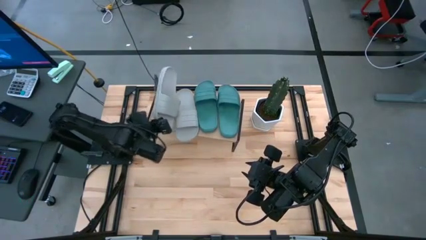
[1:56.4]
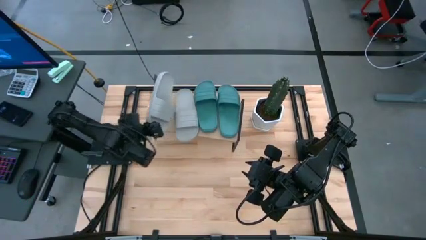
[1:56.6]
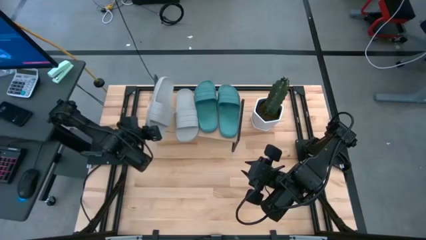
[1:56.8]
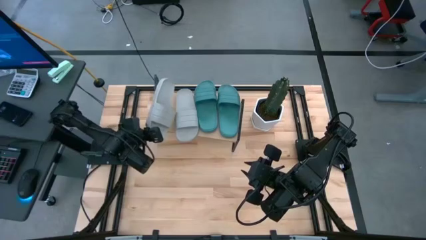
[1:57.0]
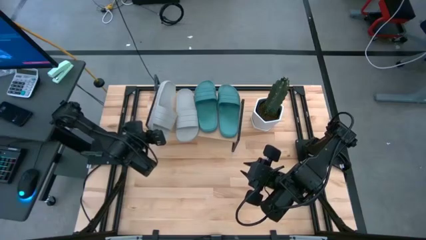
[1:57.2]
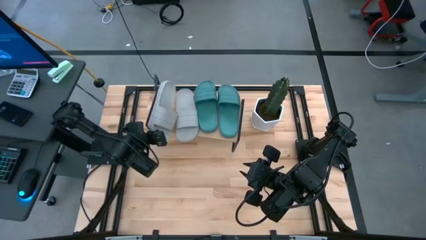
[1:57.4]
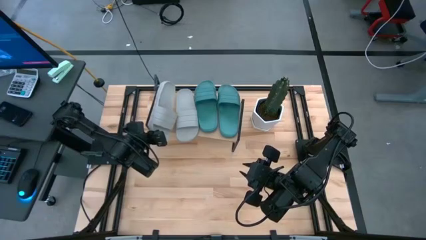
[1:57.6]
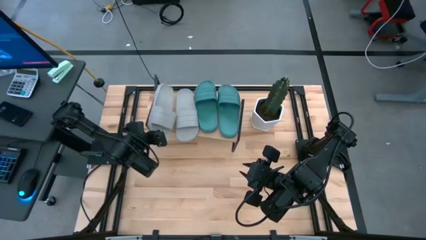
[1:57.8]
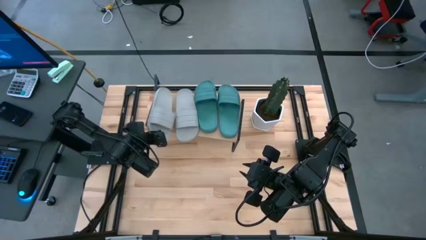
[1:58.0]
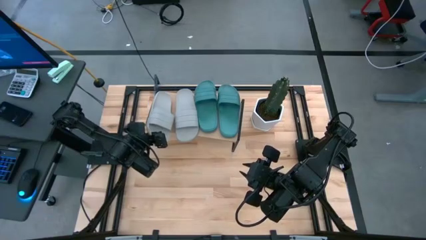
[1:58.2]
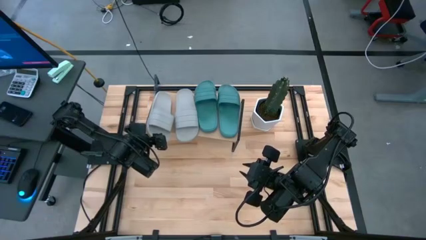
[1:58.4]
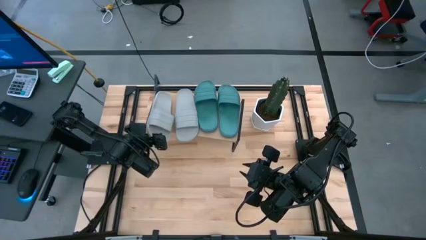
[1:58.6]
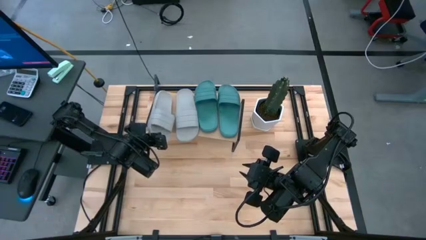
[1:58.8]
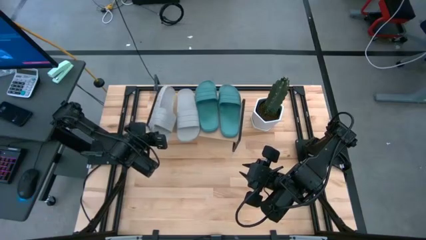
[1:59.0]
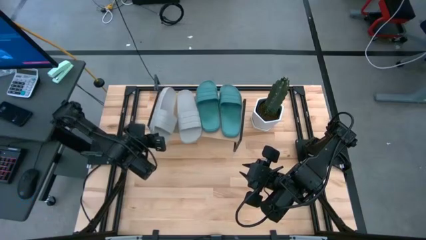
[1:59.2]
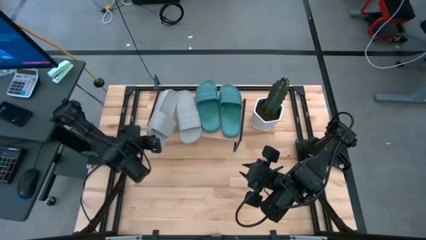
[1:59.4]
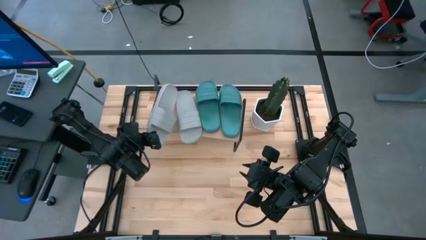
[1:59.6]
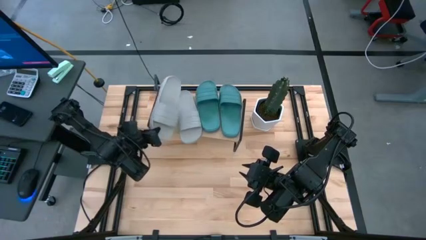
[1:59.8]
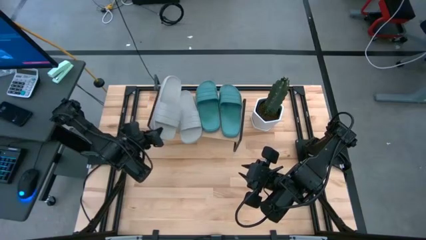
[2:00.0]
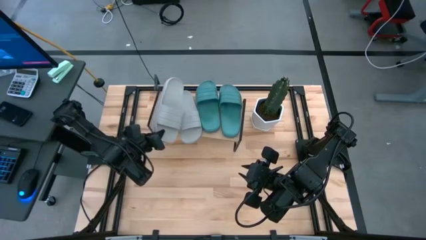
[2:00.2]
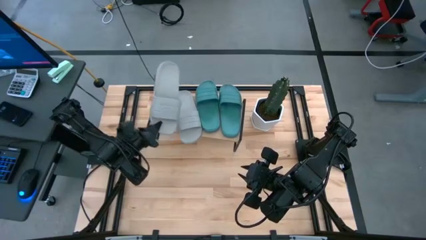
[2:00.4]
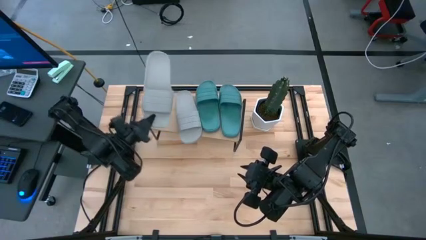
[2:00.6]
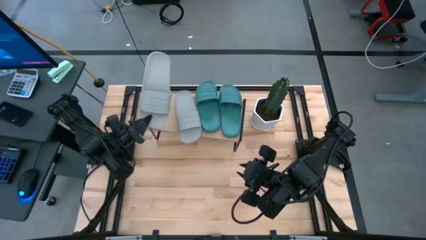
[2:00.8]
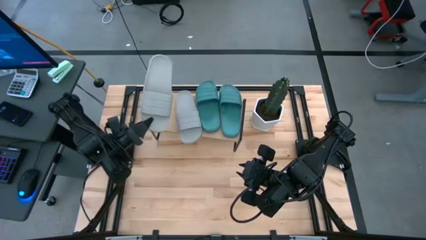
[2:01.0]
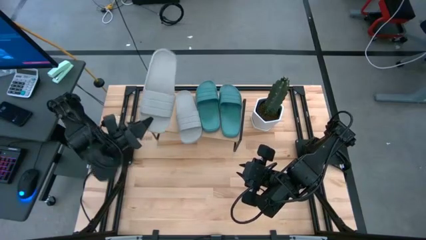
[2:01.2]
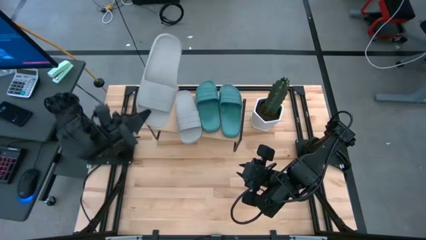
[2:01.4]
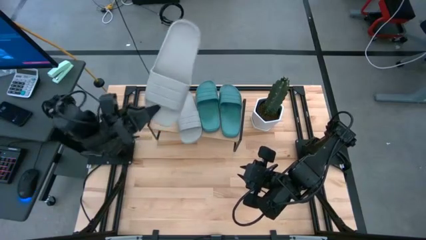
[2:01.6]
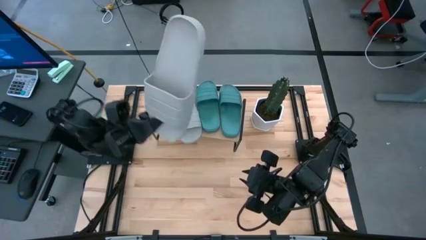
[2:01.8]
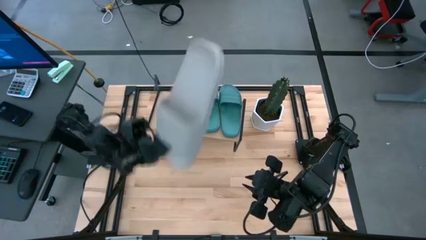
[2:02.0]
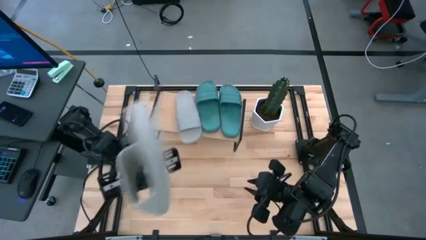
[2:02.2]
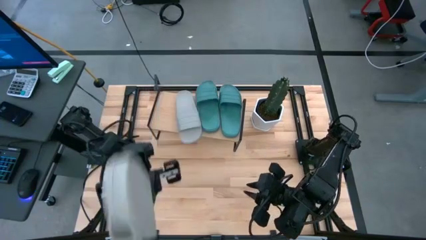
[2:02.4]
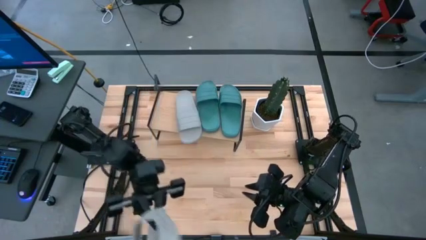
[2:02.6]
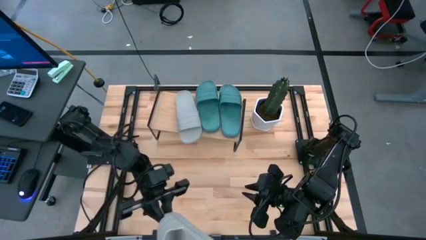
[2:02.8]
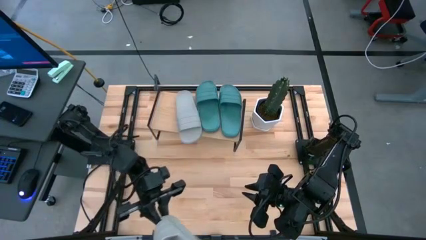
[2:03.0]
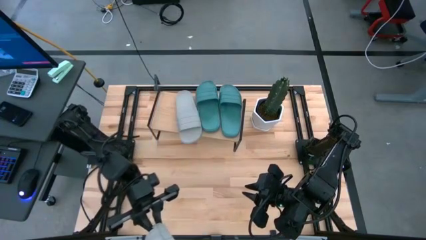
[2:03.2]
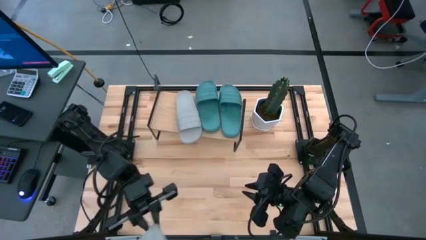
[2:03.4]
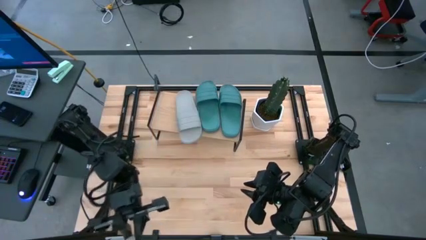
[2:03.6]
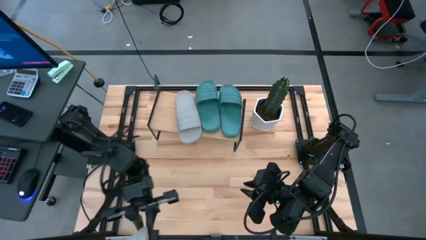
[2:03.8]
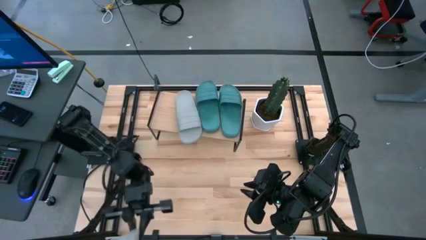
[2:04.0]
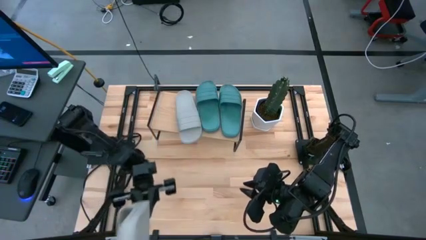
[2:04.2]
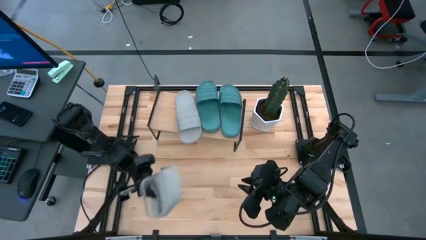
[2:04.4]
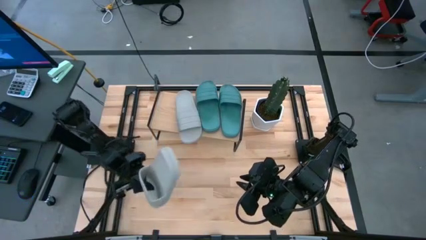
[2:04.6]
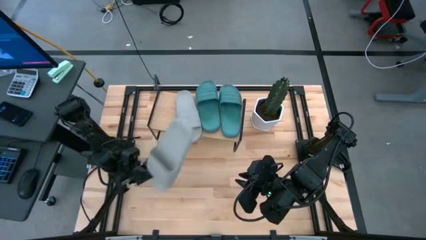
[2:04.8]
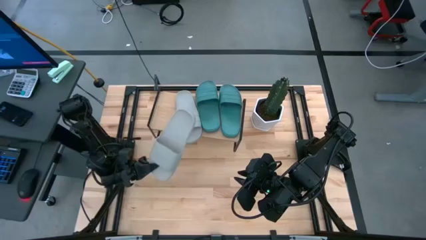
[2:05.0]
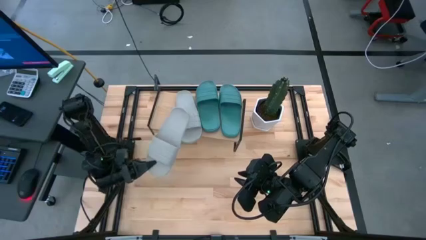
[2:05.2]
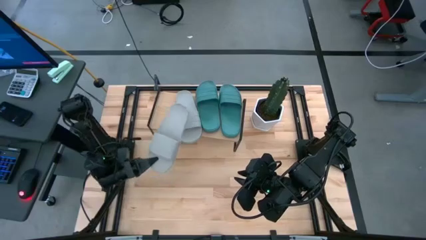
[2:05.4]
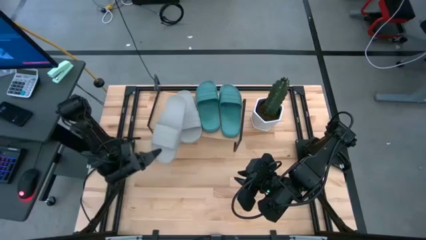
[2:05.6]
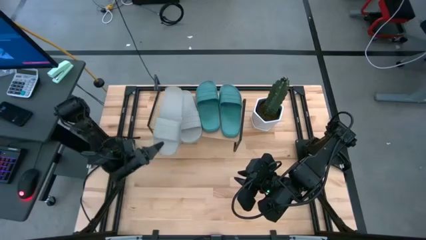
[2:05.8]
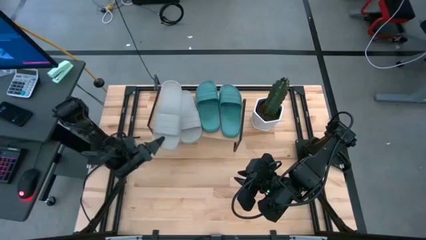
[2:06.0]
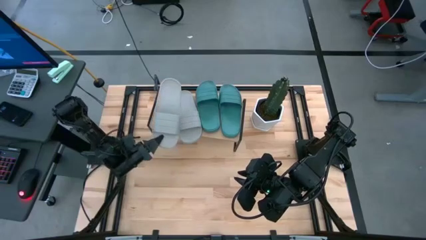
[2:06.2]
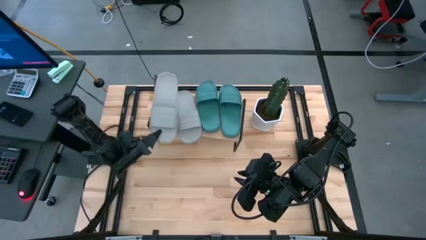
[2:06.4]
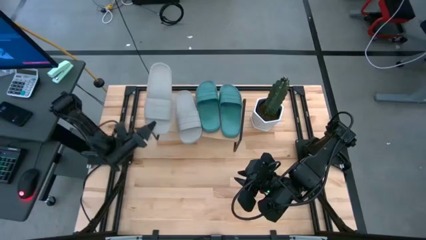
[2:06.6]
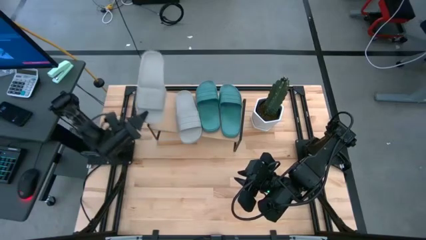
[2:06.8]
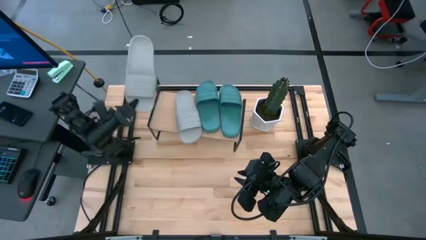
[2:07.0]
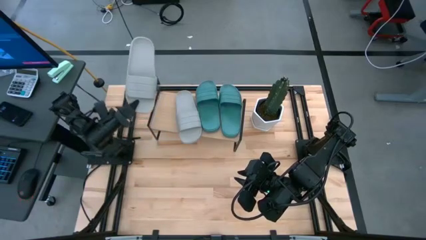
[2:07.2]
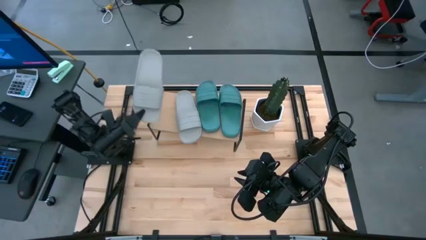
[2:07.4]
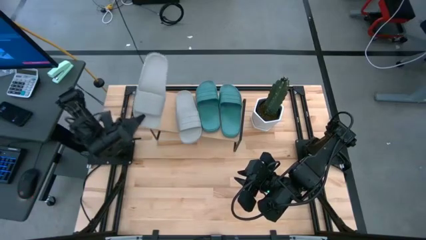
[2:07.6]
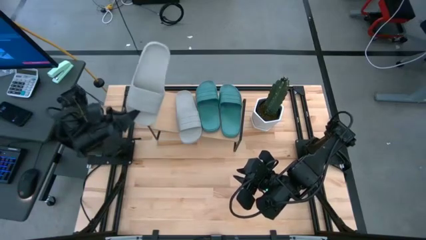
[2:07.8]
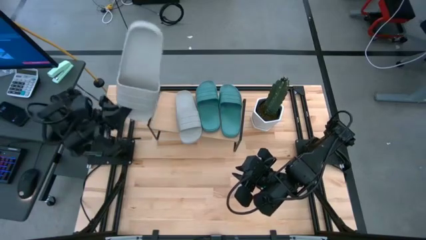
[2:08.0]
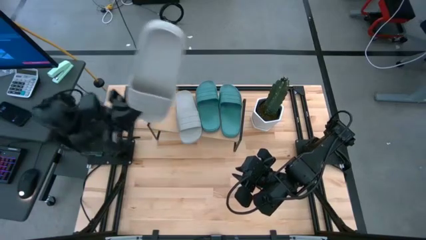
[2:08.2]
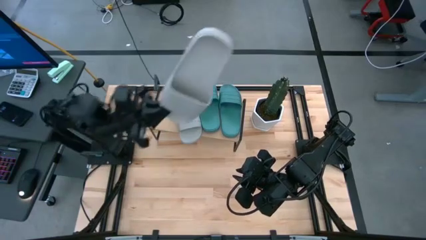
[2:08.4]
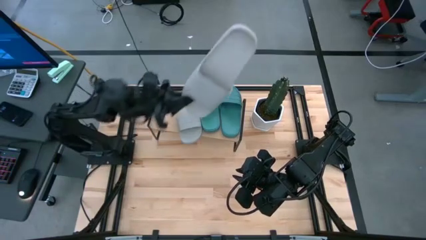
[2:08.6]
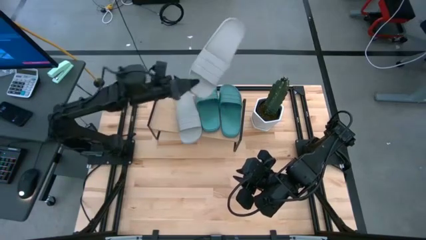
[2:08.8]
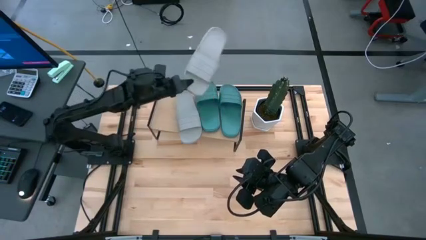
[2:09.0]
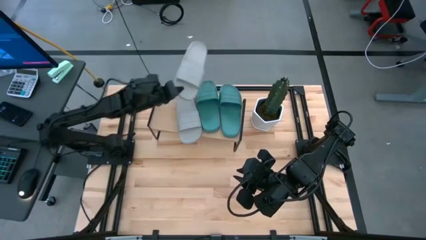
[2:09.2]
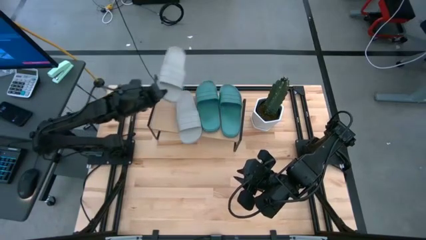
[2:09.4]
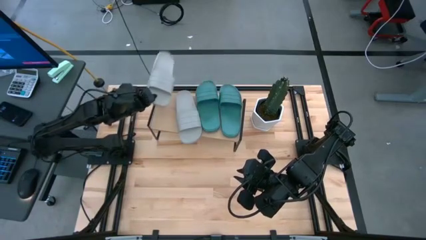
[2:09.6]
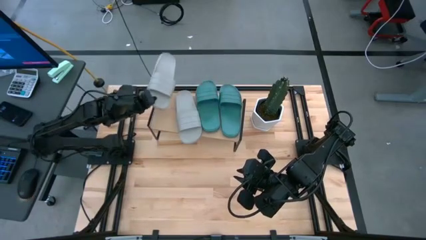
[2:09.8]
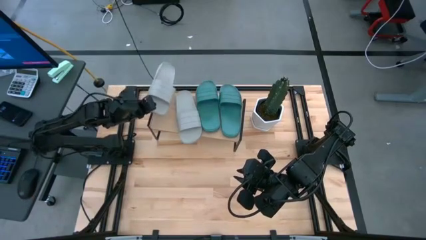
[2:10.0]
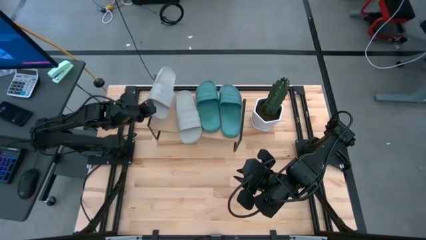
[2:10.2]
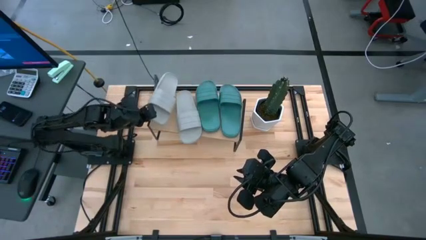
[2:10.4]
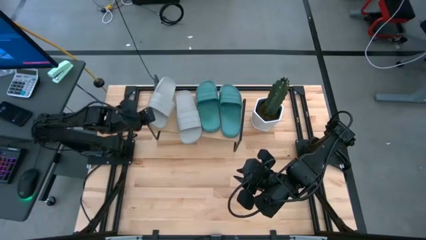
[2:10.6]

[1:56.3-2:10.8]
Task: Pick and place slides into the shelf
Put the gray slide on the shelf

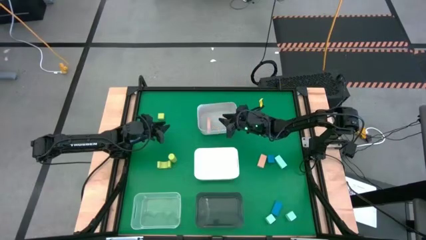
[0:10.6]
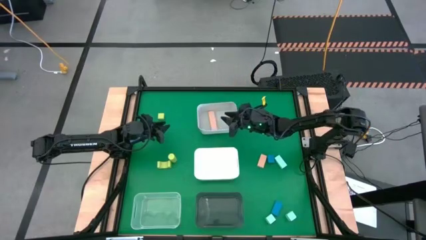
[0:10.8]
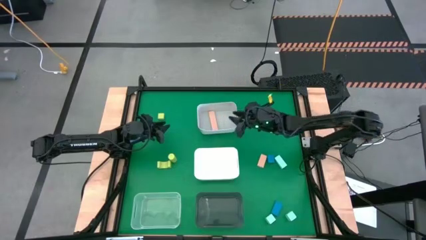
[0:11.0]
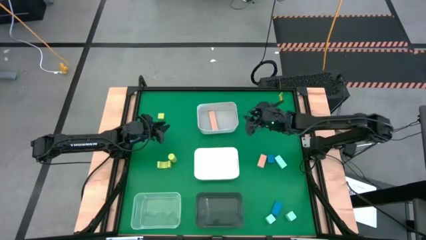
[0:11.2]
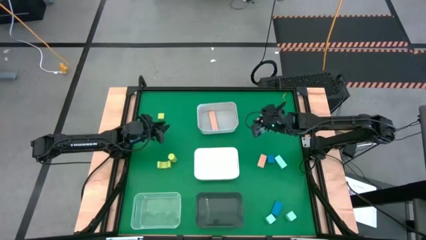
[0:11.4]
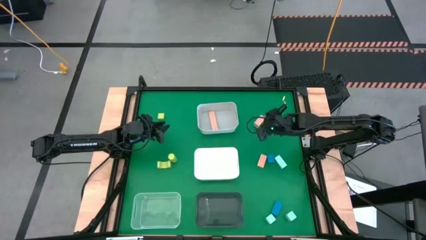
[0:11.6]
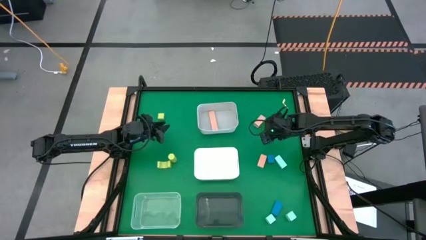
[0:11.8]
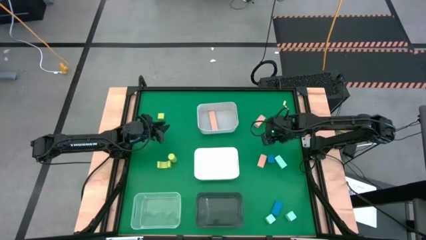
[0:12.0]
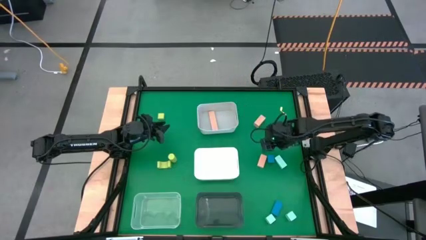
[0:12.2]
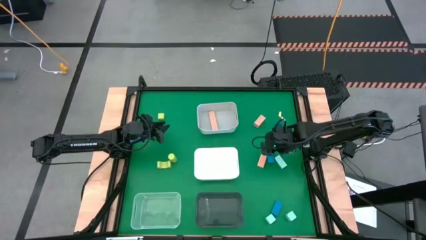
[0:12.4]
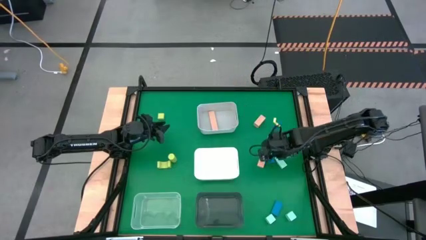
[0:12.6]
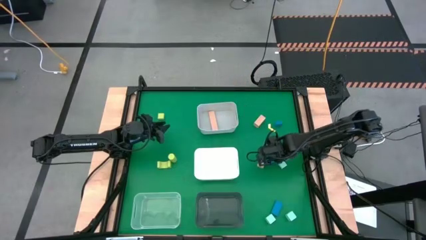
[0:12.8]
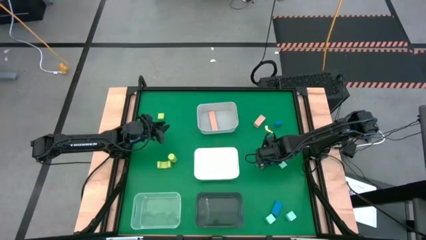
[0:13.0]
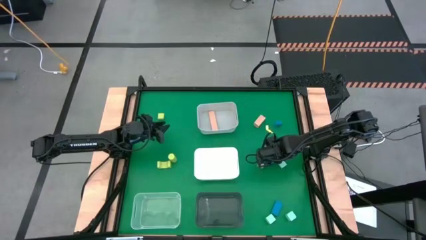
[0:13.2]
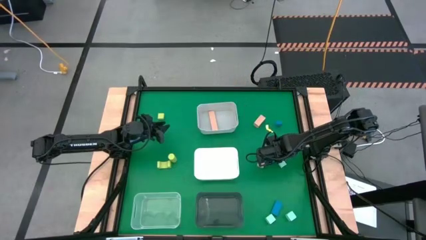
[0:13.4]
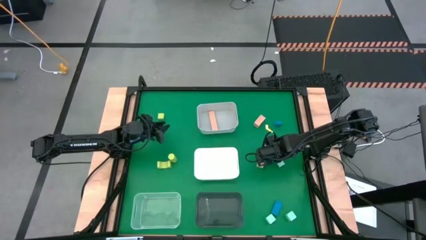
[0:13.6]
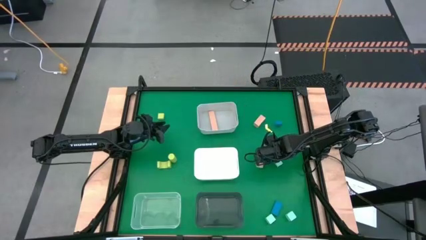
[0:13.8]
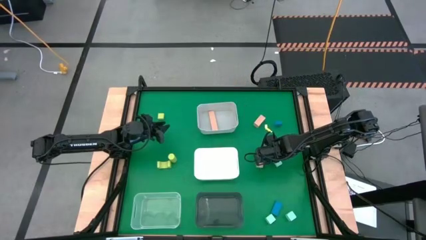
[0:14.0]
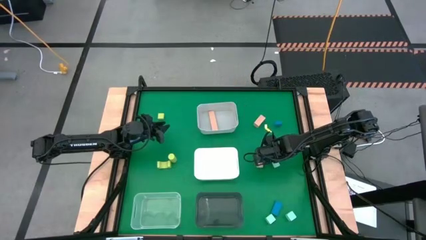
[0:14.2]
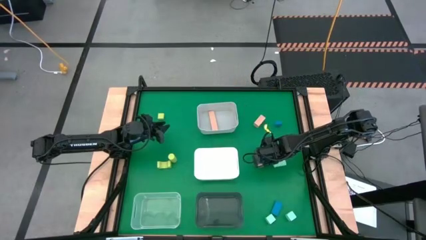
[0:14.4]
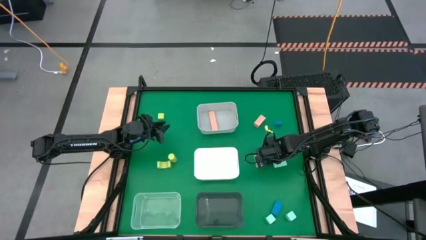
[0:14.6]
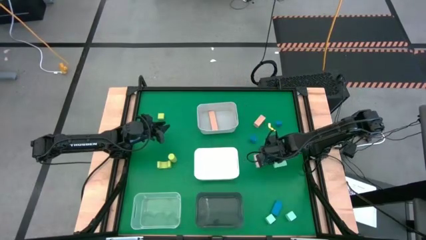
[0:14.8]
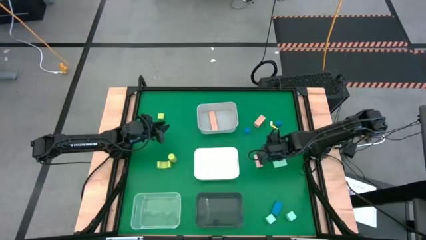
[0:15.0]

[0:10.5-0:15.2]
Task: Sort & place blocks by color
Put the middle blue block into the black bin
